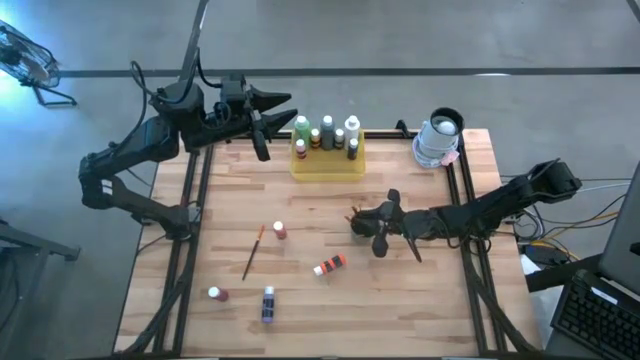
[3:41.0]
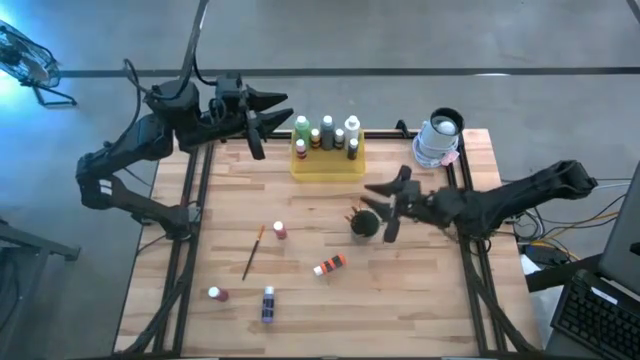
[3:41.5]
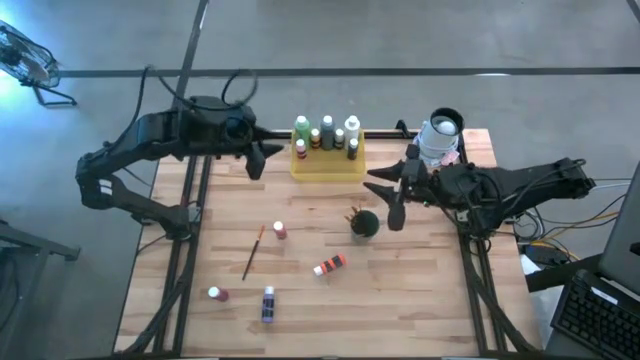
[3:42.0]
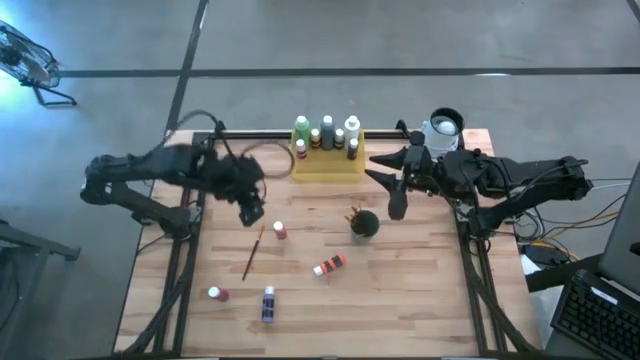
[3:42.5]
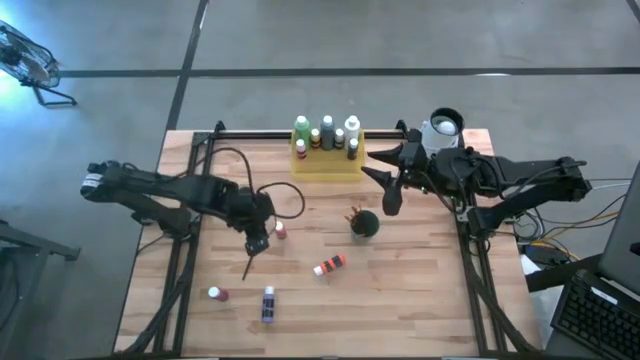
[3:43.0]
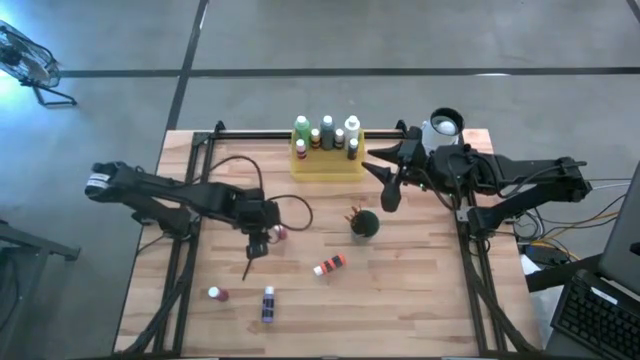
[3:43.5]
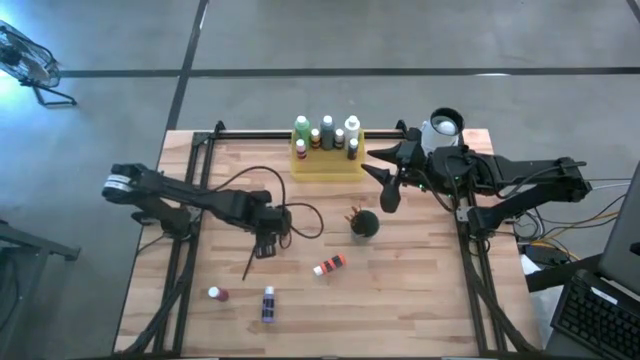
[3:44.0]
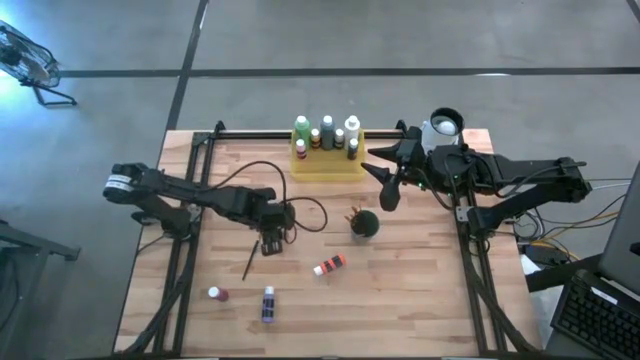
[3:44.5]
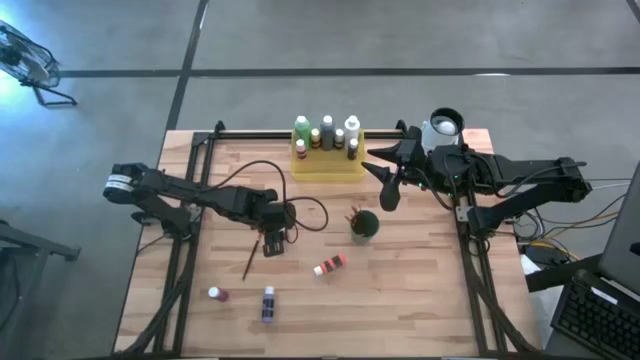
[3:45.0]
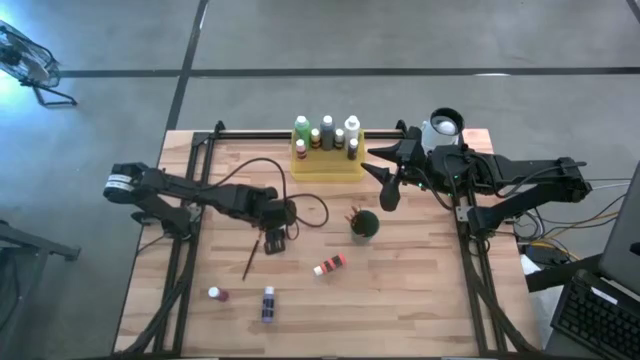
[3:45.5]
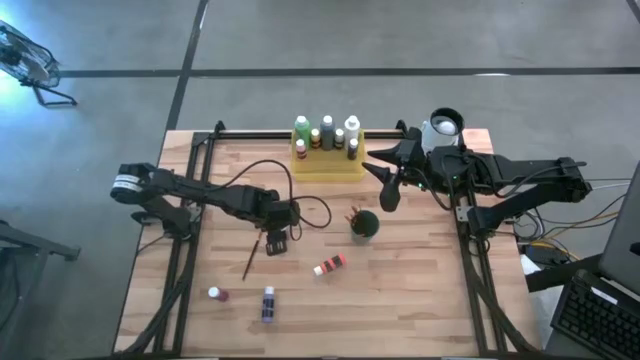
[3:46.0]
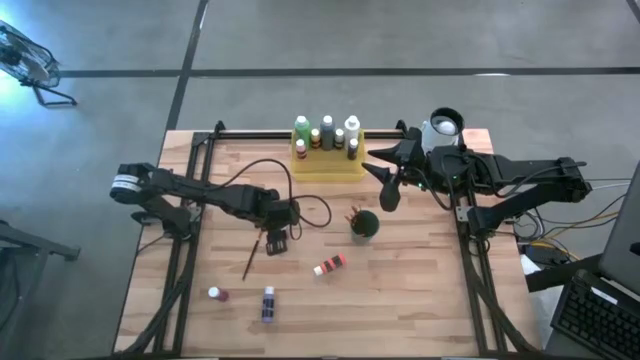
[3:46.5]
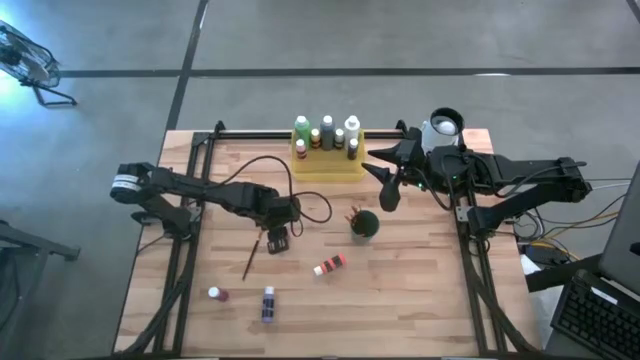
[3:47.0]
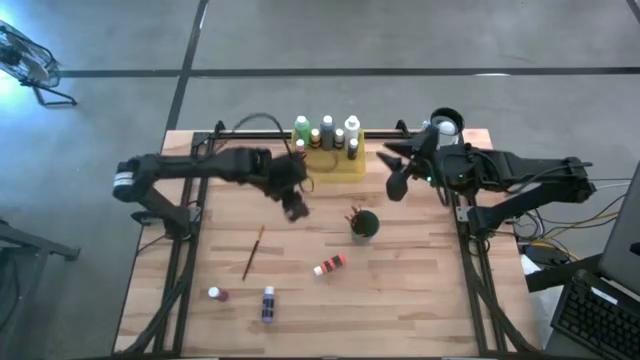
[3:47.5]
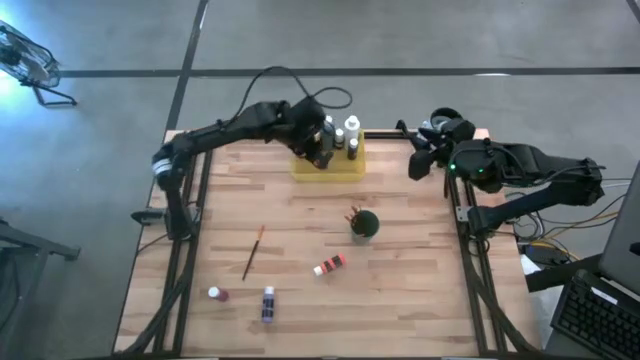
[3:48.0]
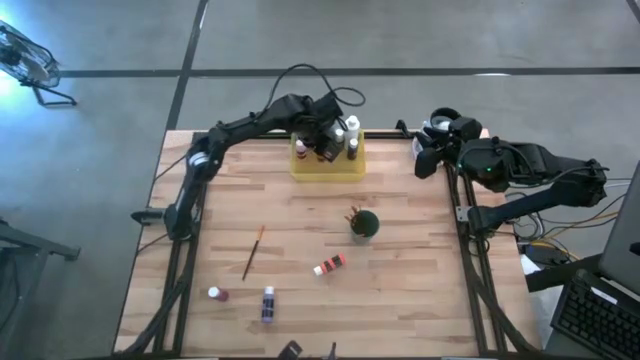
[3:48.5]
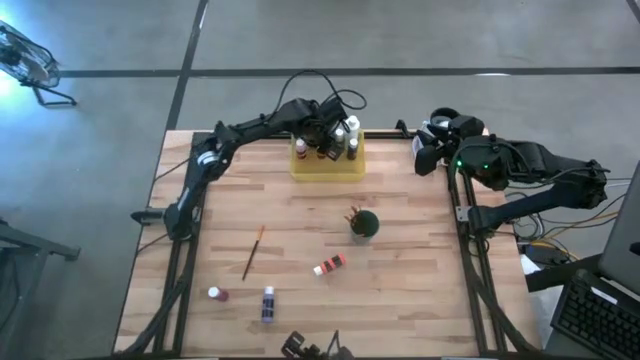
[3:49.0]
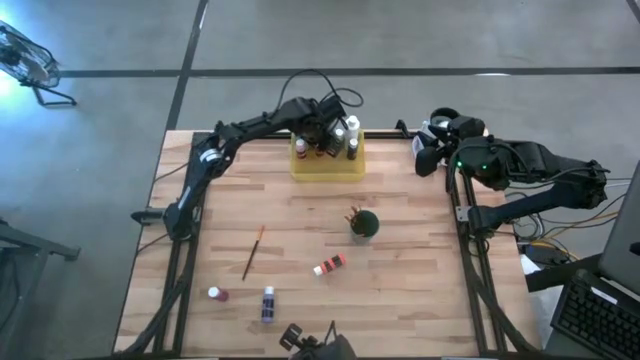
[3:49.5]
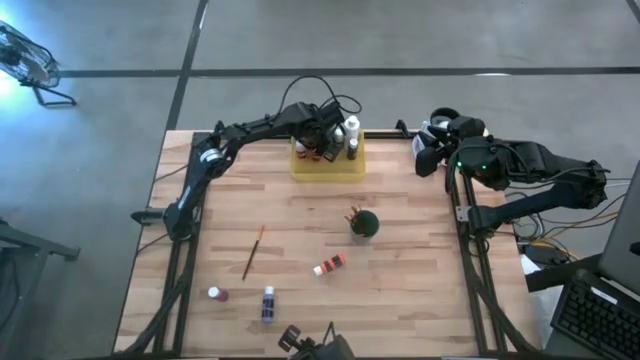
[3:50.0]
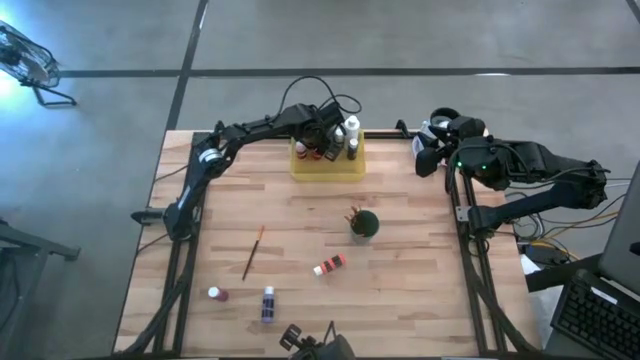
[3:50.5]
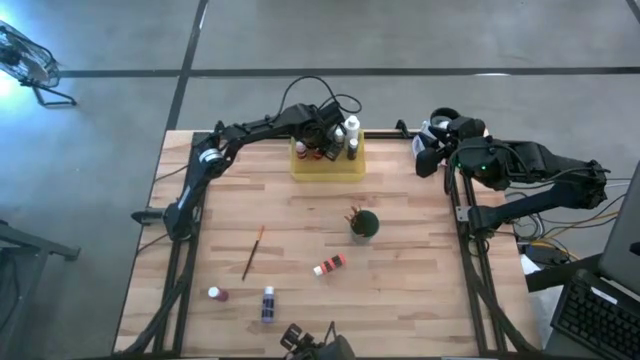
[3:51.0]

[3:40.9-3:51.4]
Task: Pick & Place Paint Supplies
Put the top orange paint bottle into the yellow bin

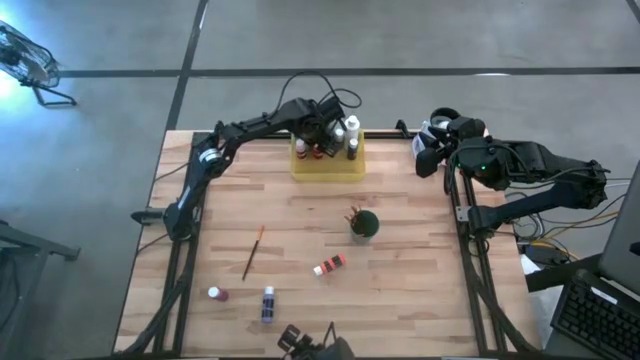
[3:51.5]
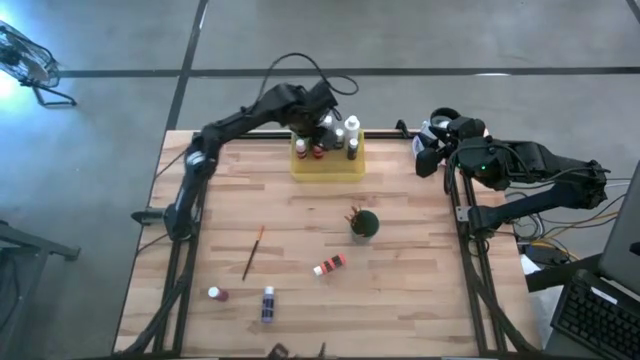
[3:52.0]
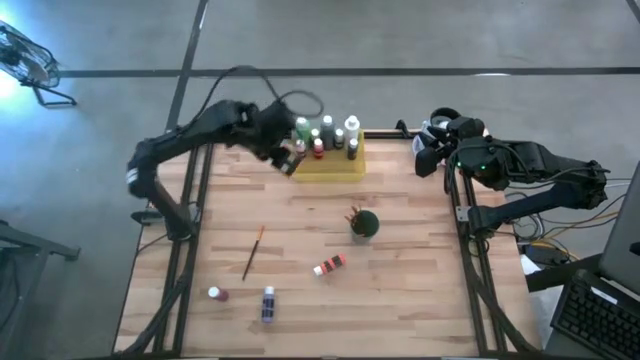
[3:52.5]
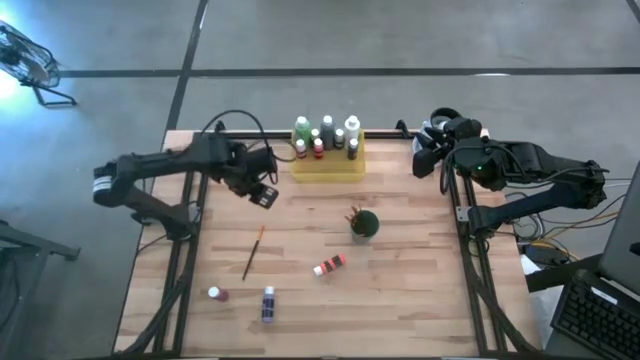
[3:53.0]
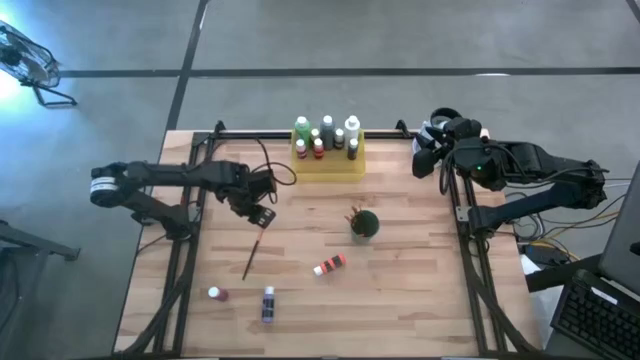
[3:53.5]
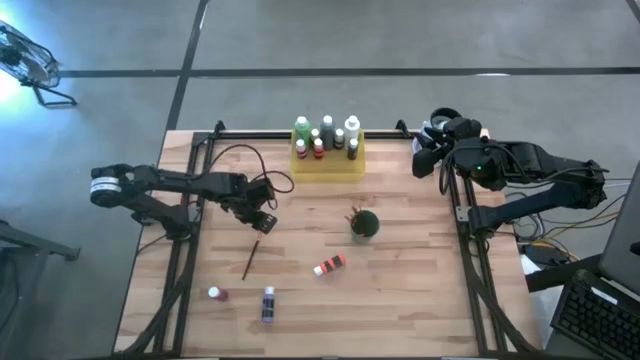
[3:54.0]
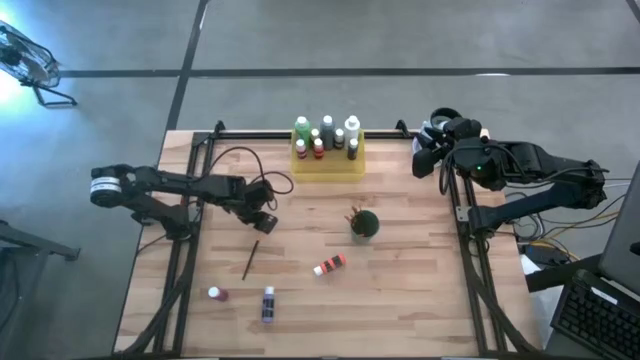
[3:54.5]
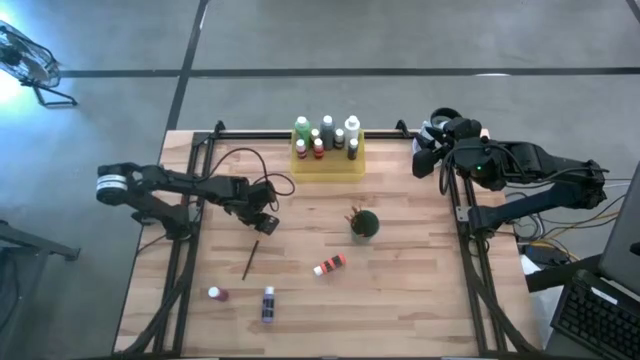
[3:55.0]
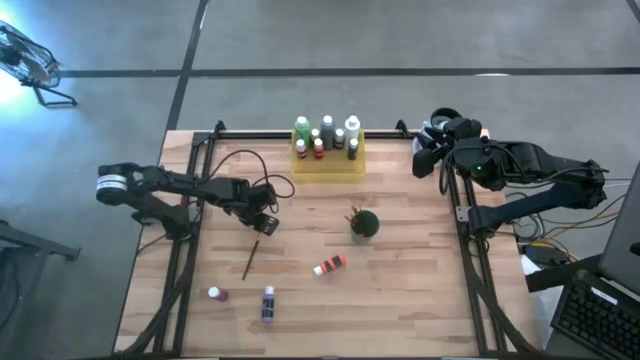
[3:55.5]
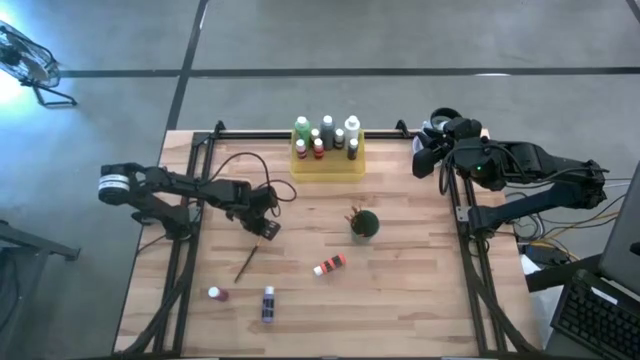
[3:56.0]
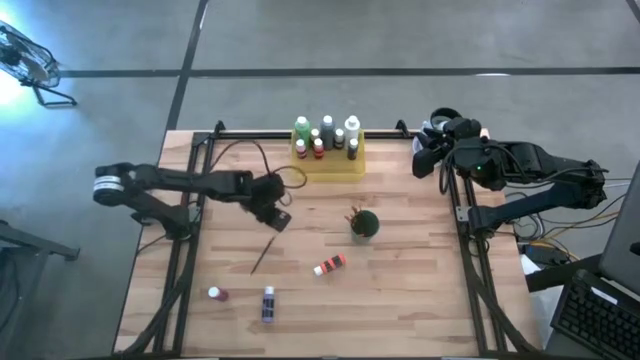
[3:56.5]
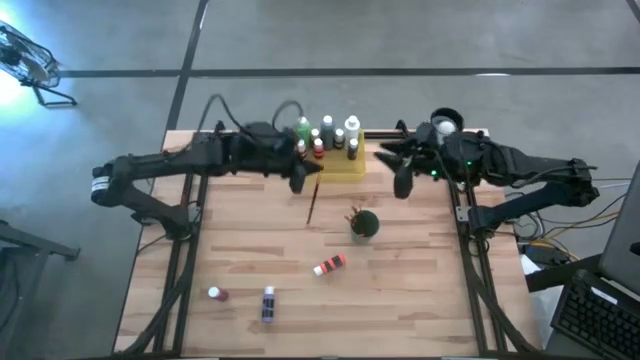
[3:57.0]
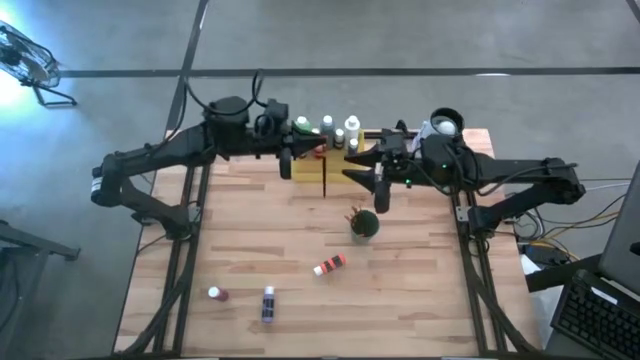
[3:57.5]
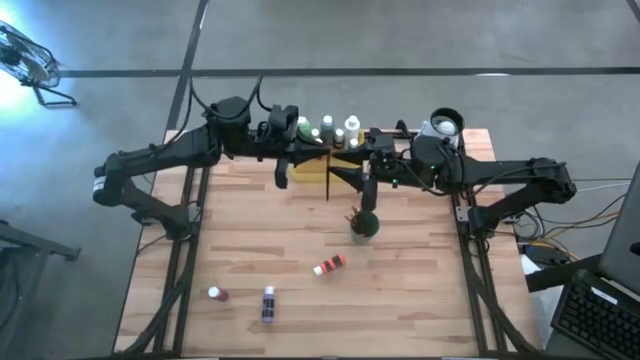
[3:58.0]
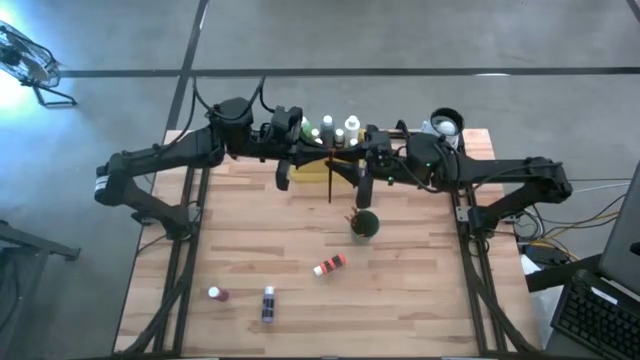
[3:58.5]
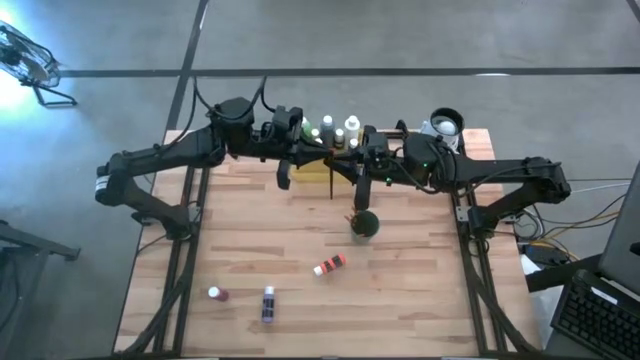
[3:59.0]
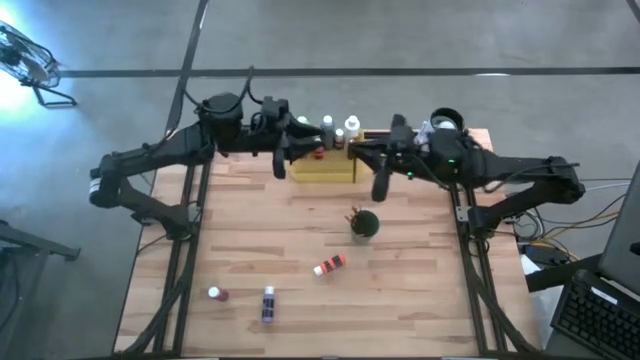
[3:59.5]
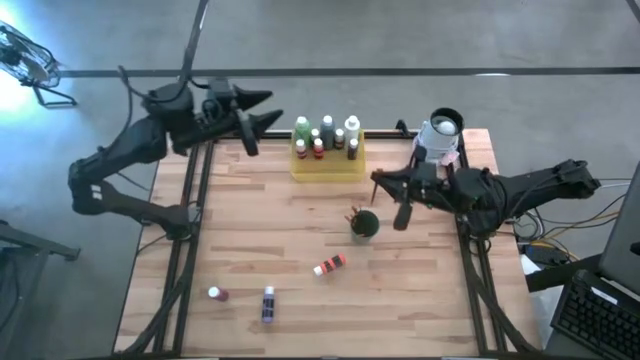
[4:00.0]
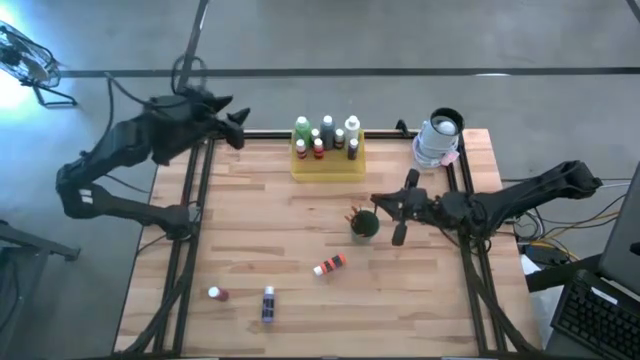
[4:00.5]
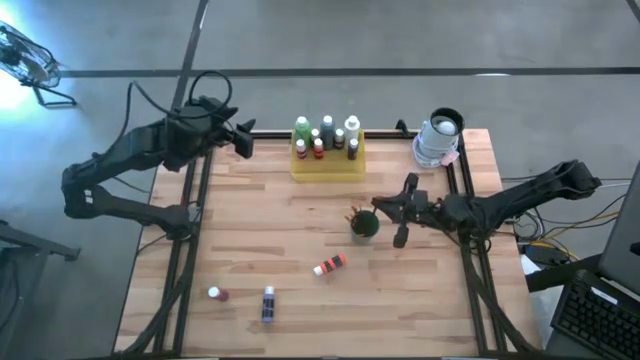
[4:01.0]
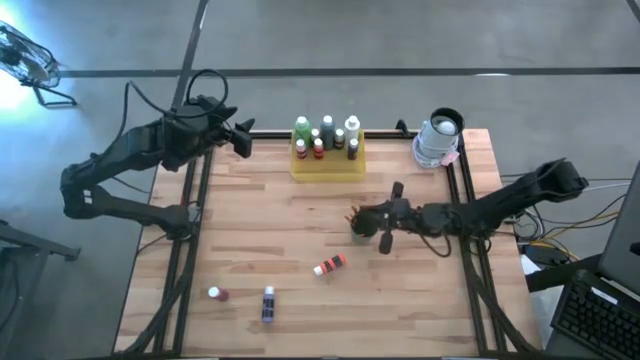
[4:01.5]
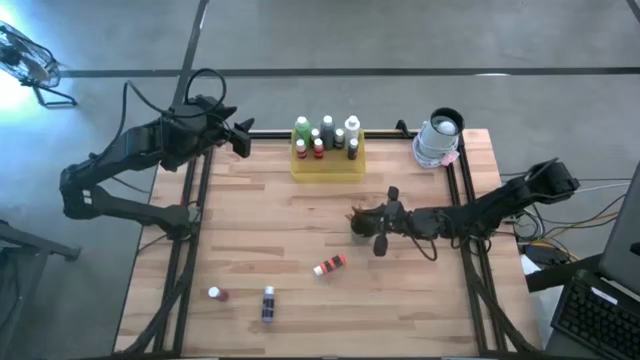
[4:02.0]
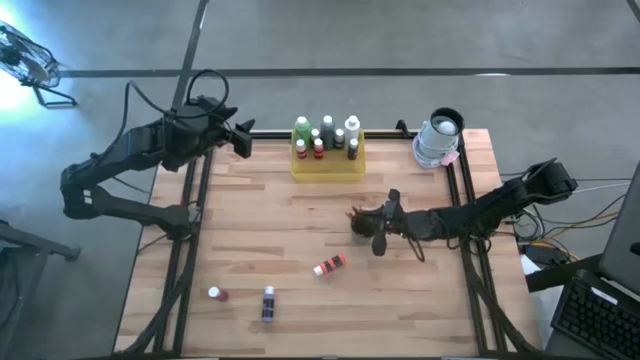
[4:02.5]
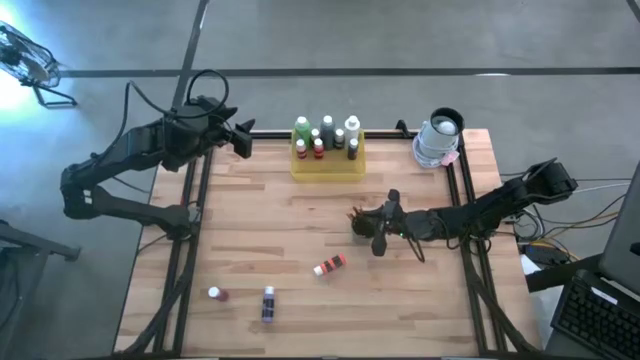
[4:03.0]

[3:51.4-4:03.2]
Put the gold paint brush into the green cup
